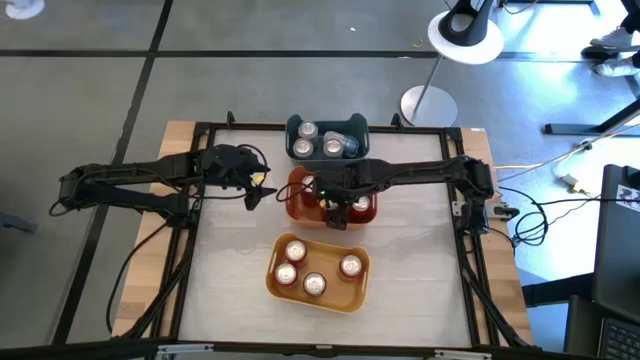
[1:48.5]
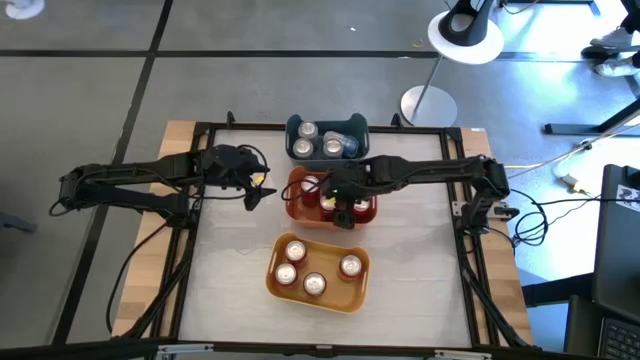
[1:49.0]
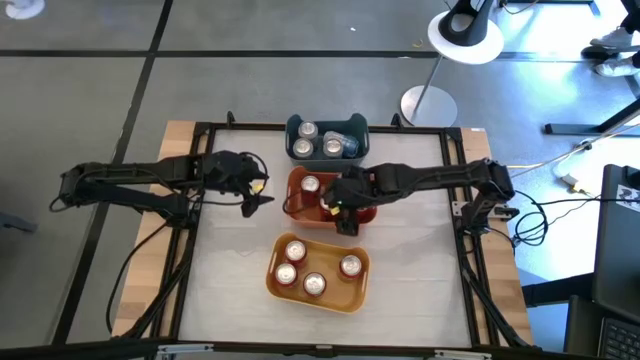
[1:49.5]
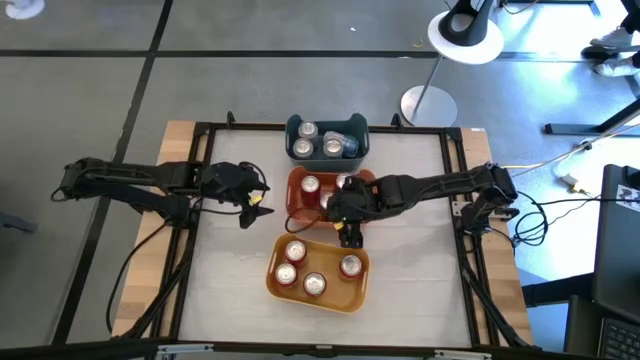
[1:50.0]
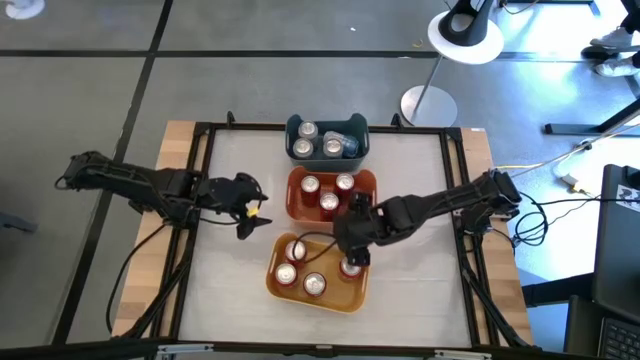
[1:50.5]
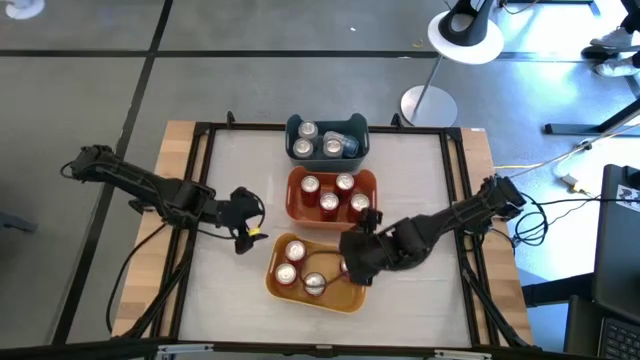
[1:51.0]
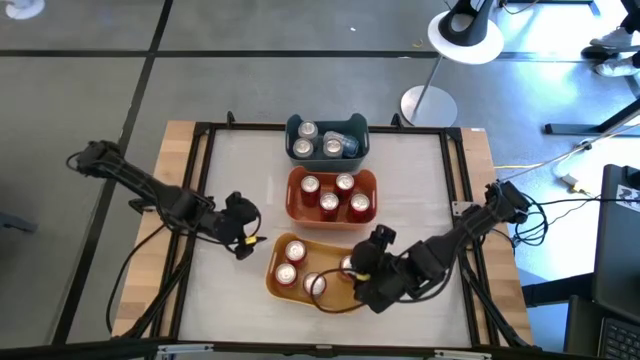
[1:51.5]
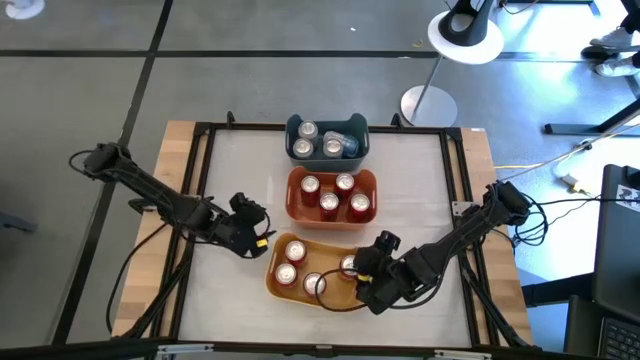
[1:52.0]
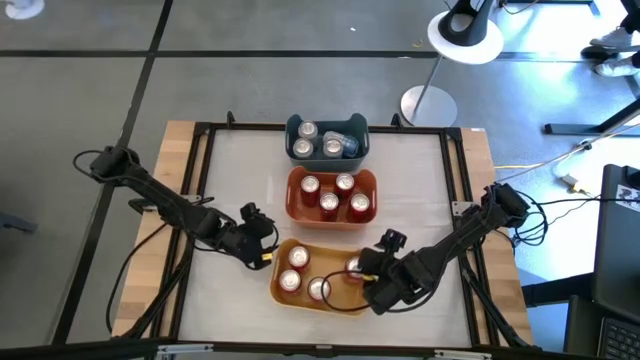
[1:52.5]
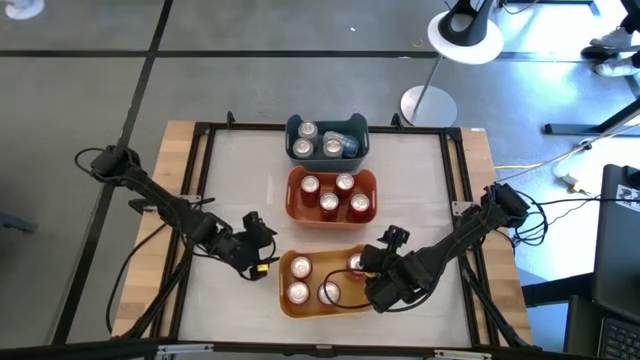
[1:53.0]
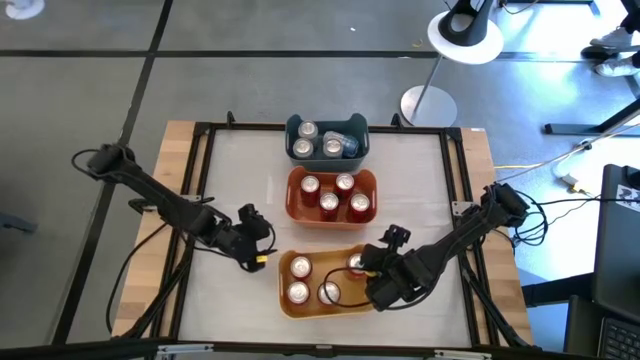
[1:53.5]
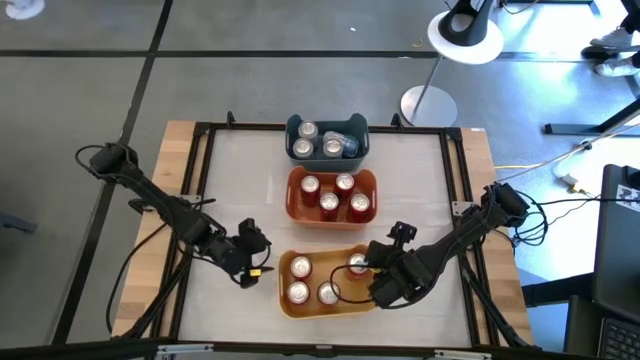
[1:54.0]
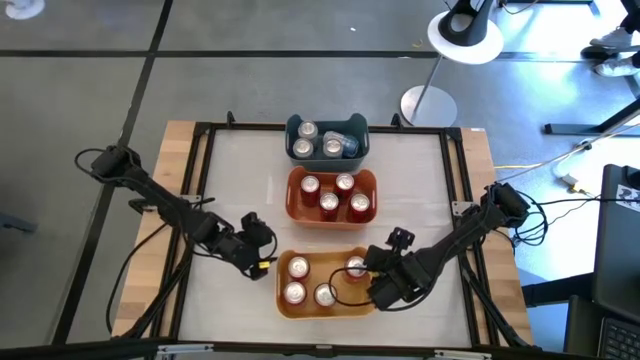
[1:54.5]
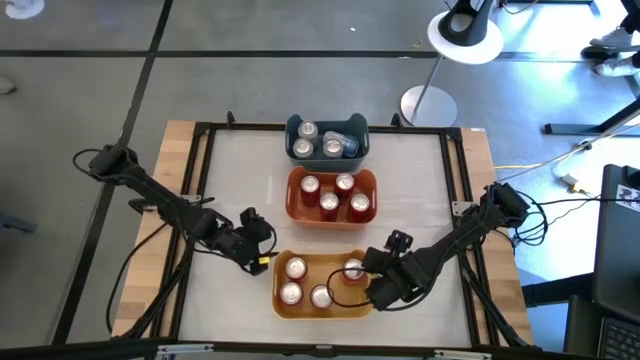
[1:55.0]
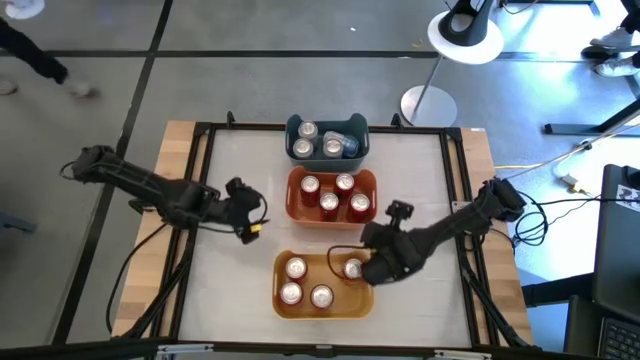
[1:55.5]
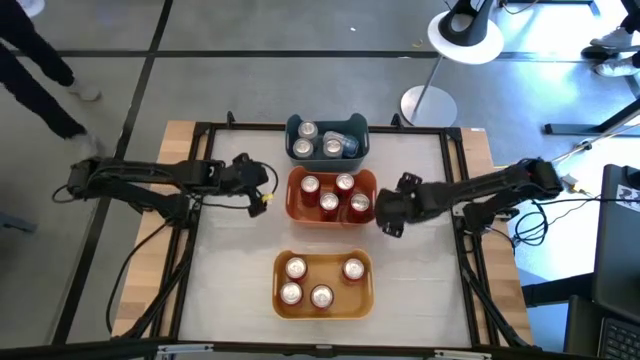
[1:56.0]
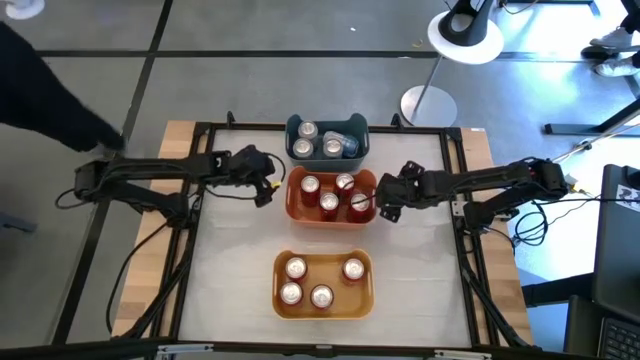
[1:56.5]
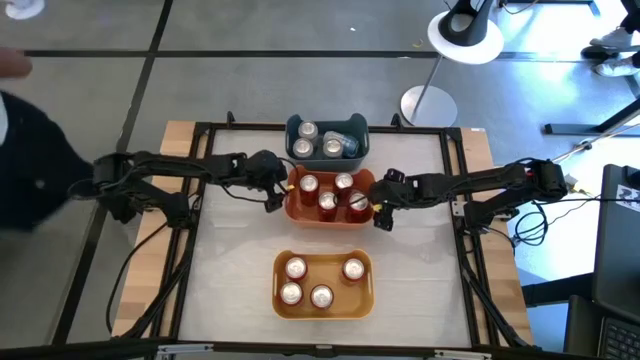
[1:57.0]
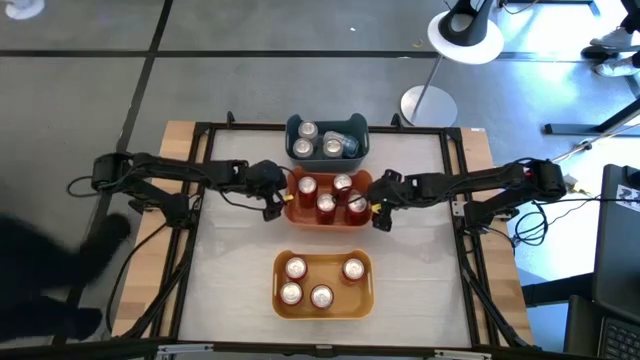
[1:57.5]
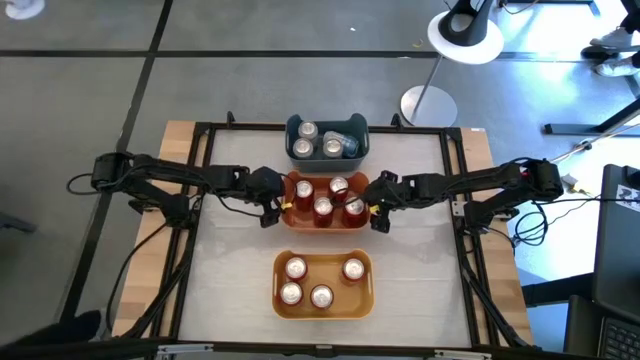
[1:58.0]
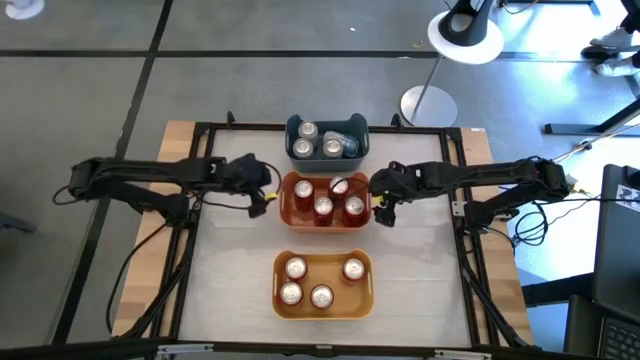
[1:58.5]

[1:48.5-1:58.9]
Task: Sort soda cans
Adjust the bins

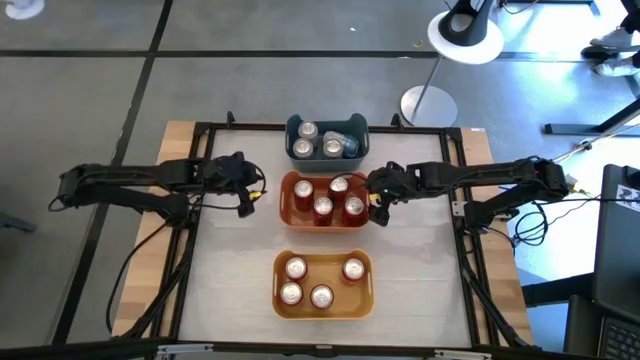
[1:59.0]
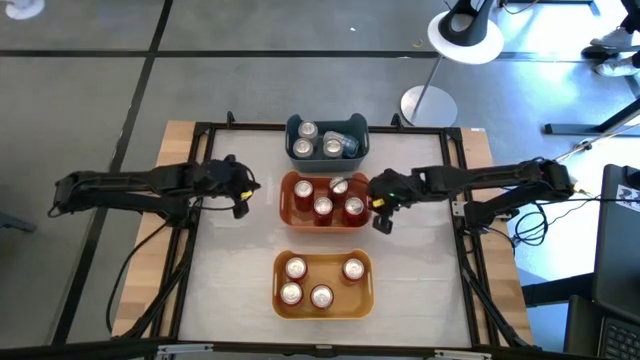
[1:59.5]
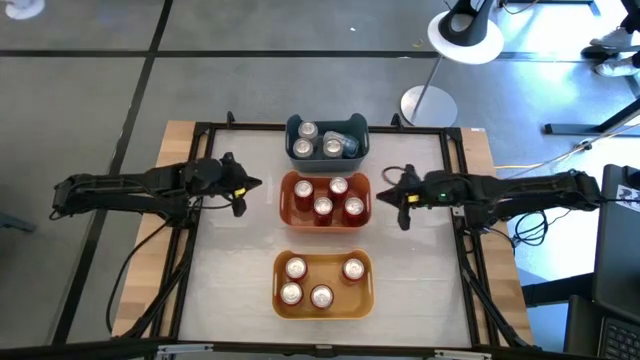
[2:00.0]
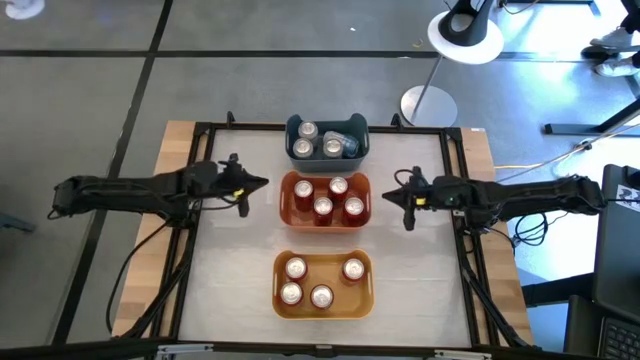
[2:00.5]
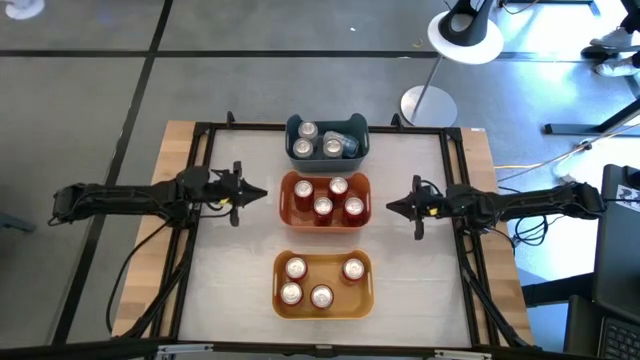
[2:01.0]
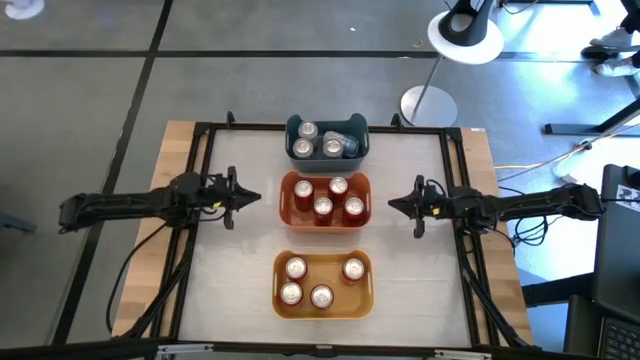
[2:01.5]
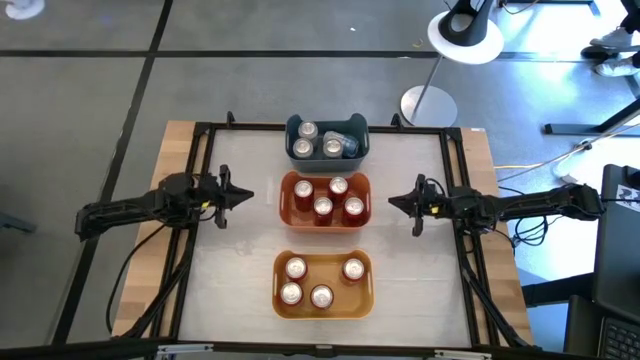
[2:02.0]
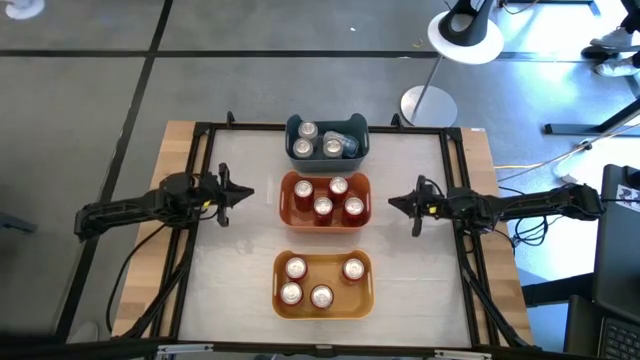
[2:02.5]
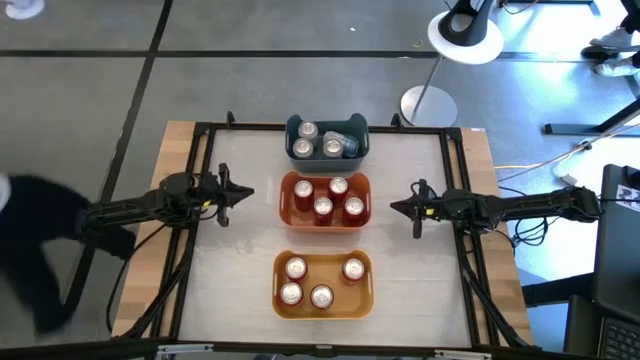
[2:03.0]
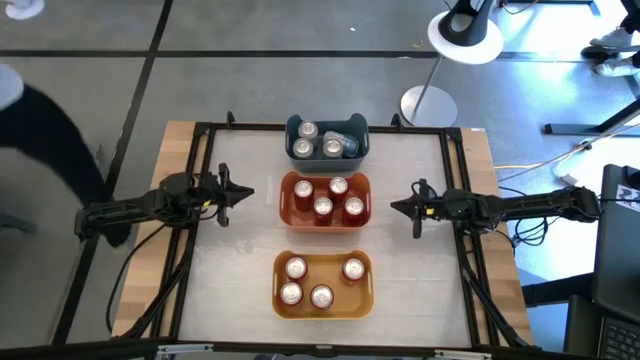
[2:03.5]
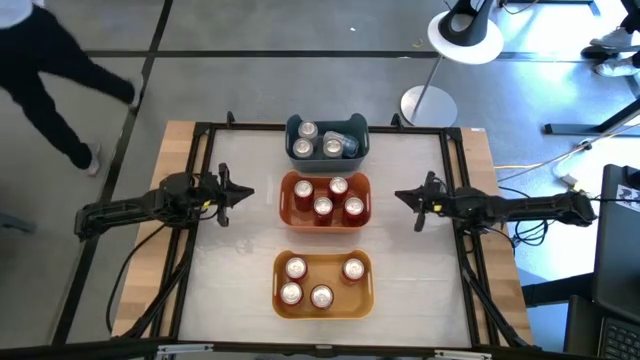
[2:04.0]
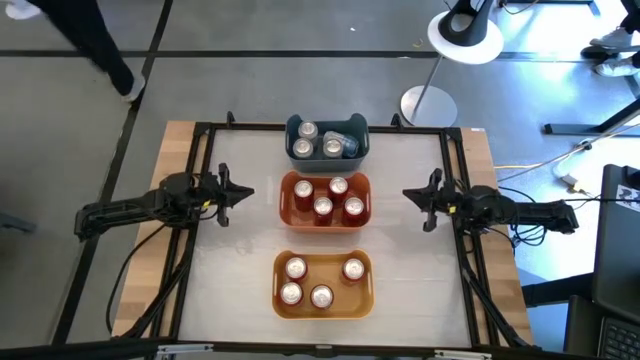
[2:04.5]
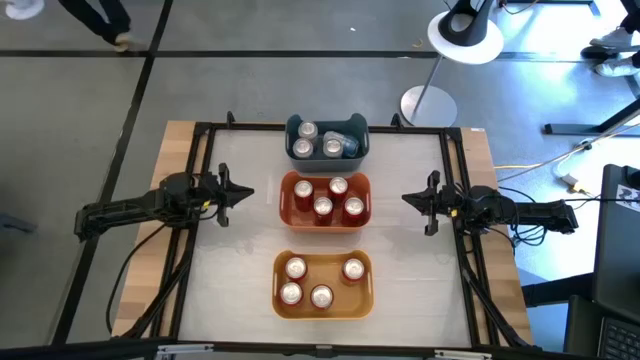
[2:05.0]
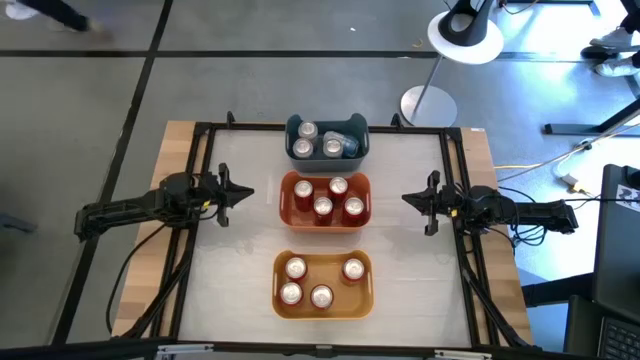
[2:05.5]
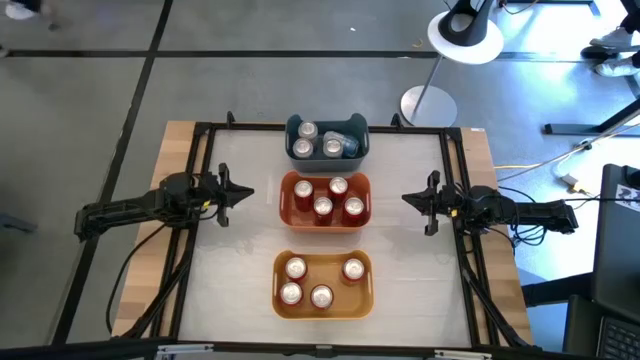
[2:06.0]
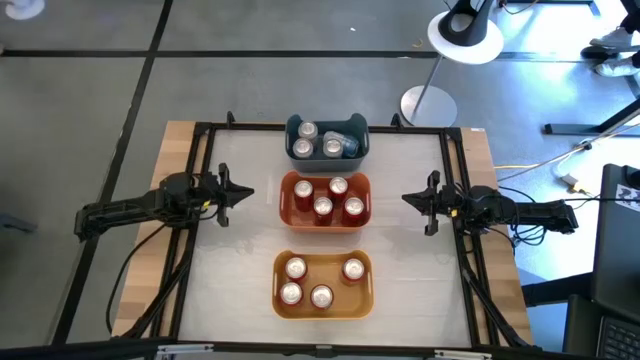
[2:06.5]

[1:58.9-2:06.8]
Return to Home Position

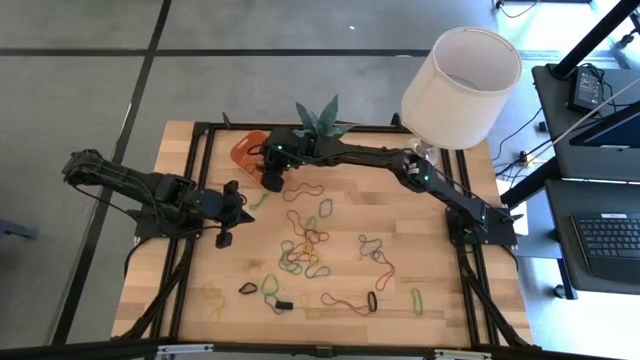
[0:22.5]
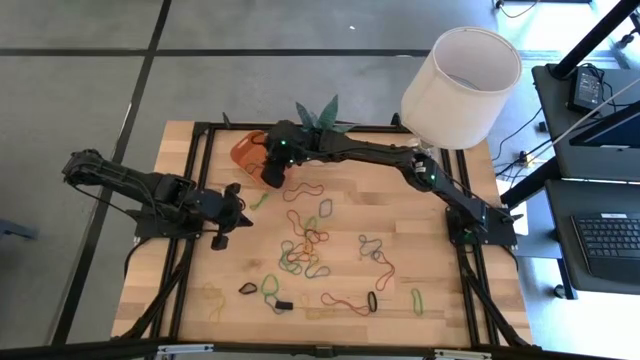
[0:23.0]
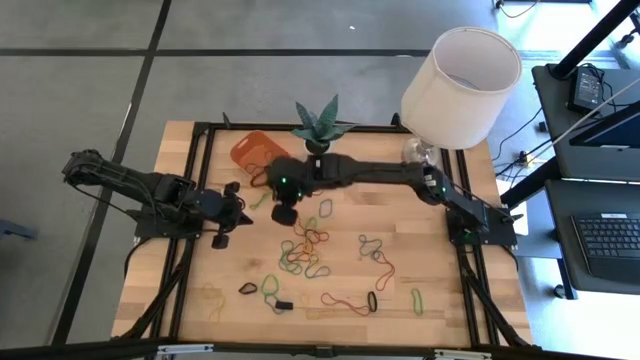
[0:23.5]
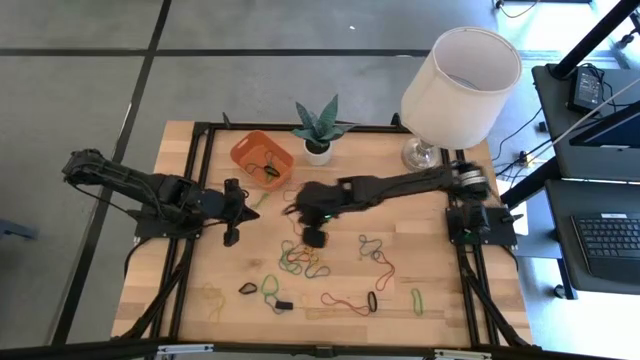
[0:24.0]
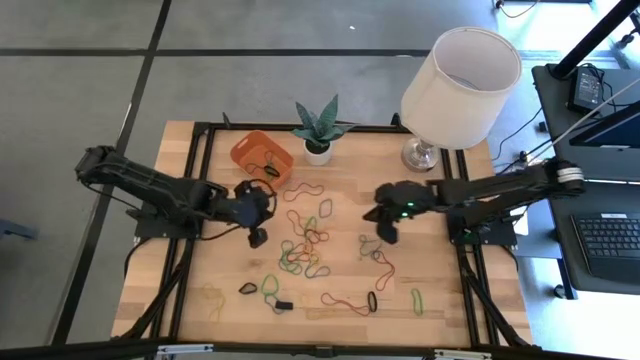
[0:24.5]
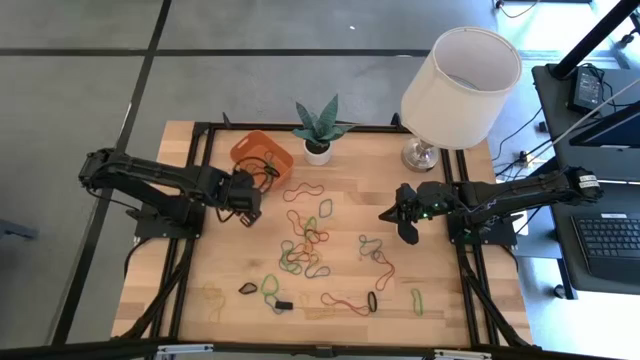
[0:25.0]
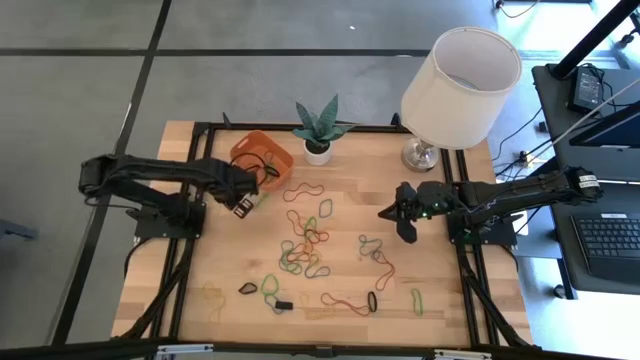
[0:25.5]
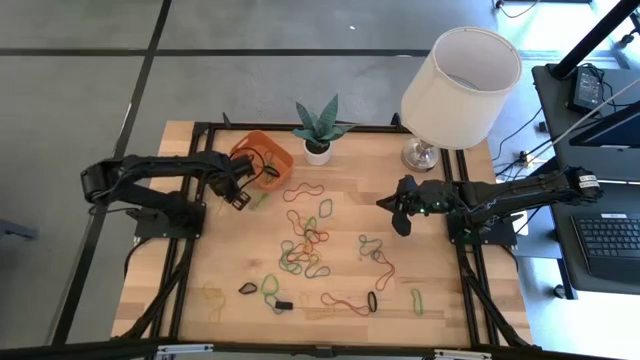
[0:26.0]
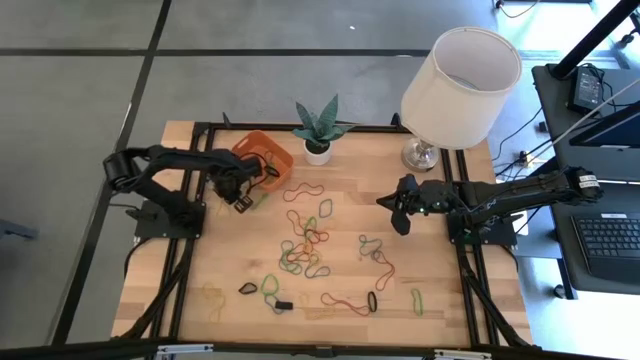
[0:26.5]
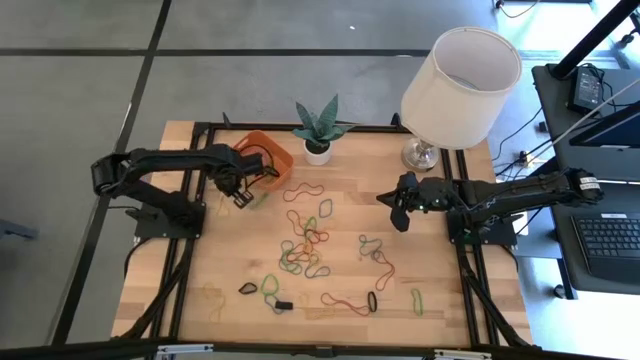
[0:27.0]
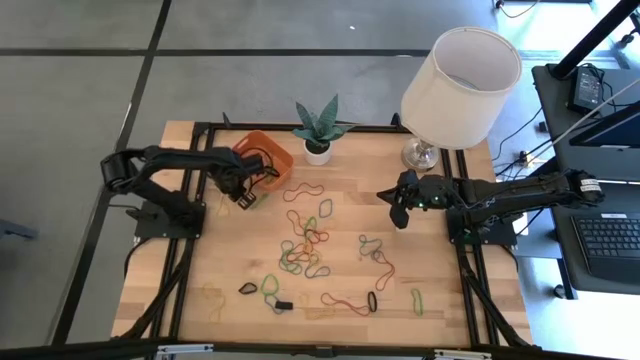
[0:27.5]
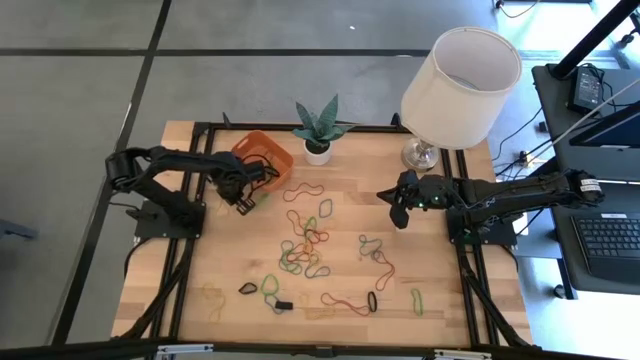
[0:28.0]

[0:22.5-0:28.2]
Task: Pick and place rubber bands into bin
Put the yellow rubber band into the orange bin
